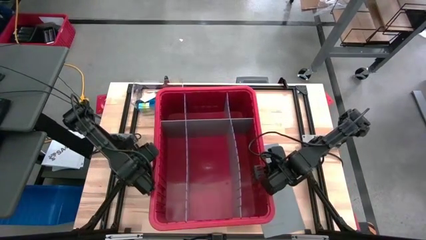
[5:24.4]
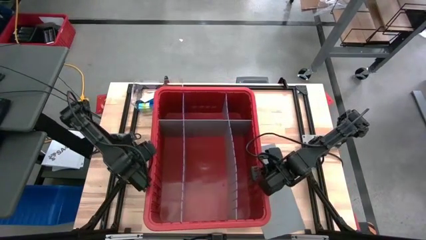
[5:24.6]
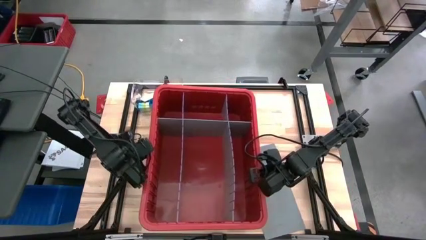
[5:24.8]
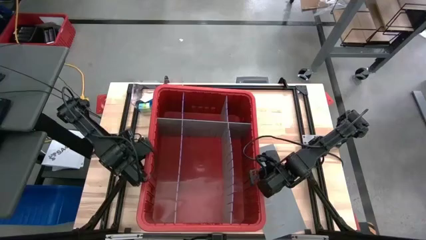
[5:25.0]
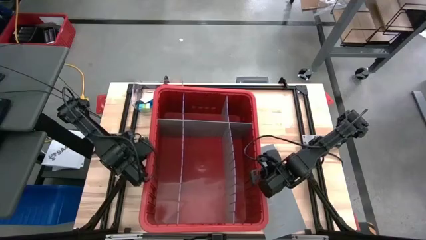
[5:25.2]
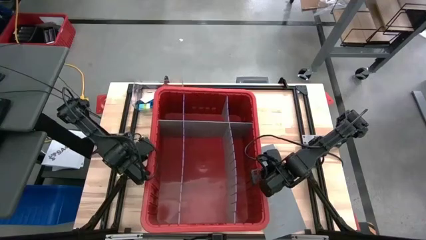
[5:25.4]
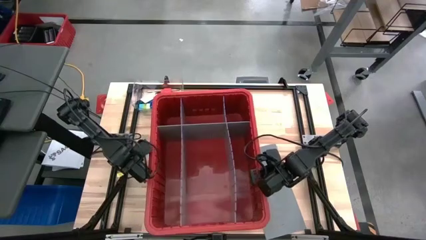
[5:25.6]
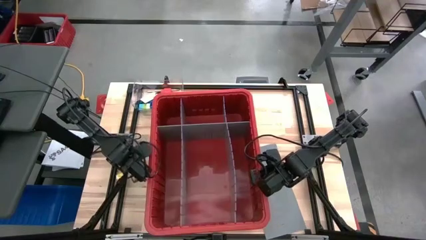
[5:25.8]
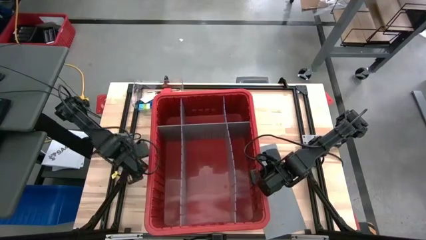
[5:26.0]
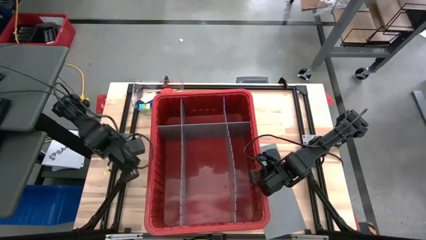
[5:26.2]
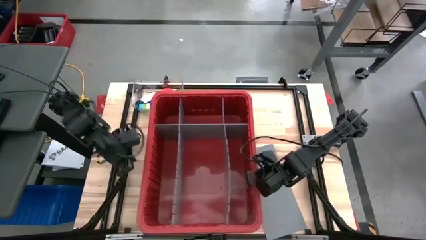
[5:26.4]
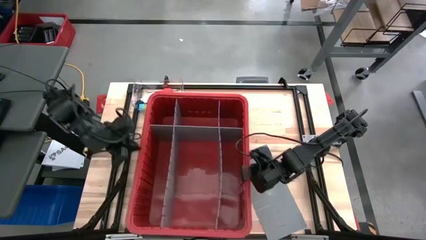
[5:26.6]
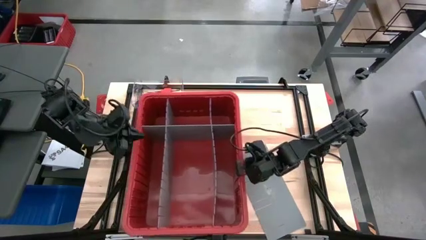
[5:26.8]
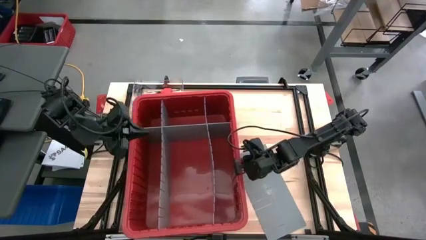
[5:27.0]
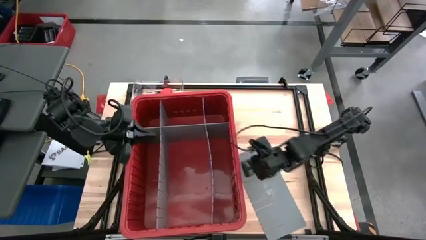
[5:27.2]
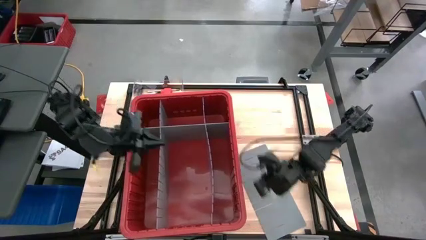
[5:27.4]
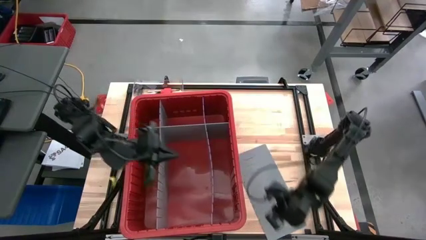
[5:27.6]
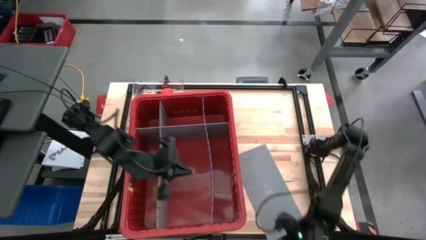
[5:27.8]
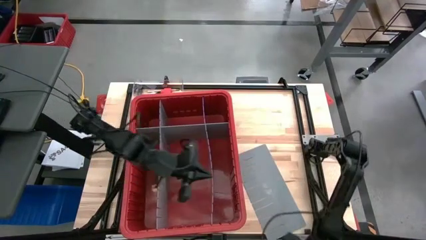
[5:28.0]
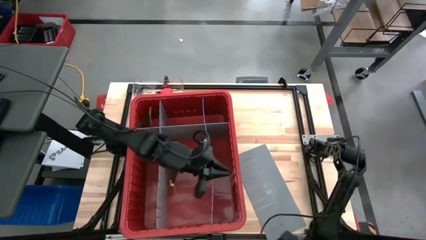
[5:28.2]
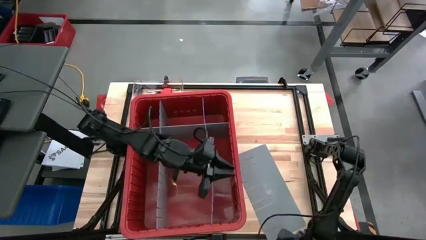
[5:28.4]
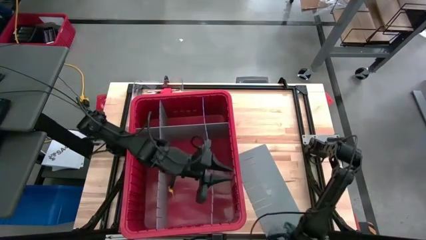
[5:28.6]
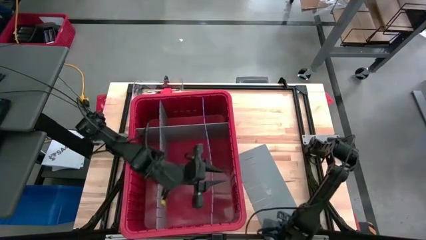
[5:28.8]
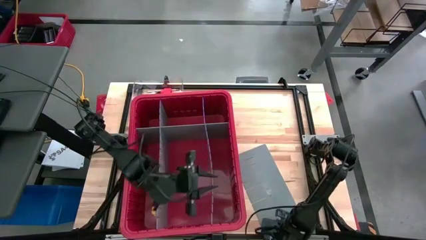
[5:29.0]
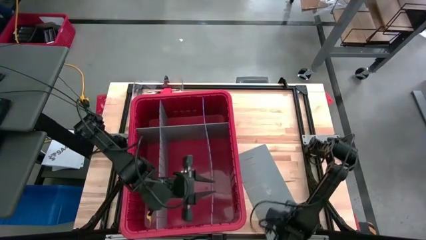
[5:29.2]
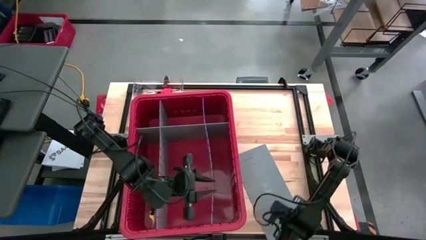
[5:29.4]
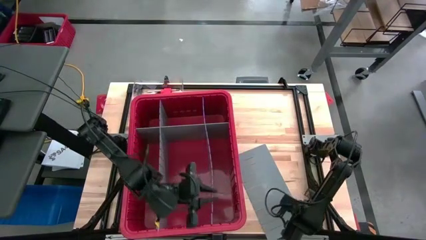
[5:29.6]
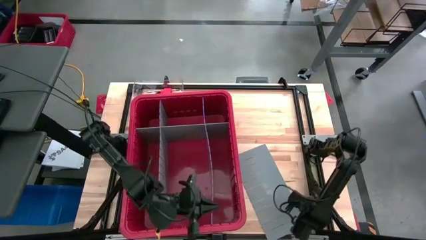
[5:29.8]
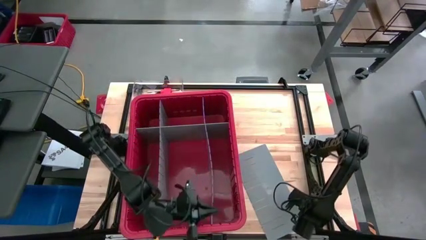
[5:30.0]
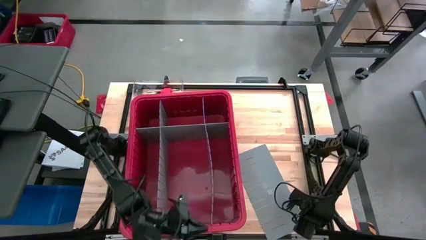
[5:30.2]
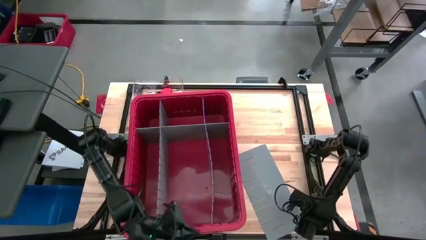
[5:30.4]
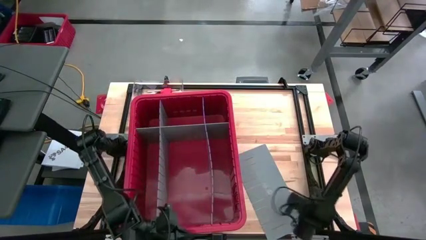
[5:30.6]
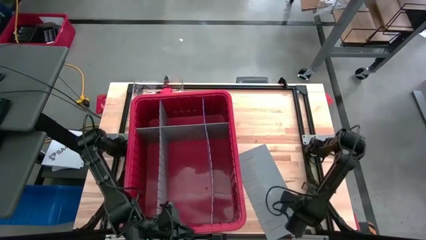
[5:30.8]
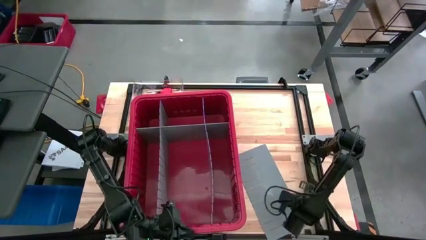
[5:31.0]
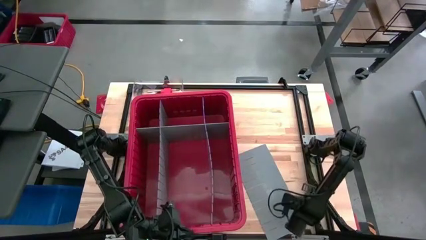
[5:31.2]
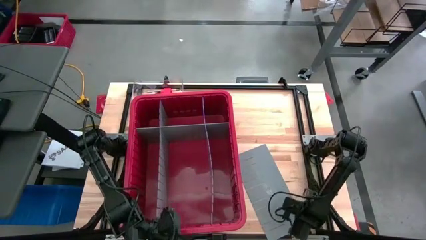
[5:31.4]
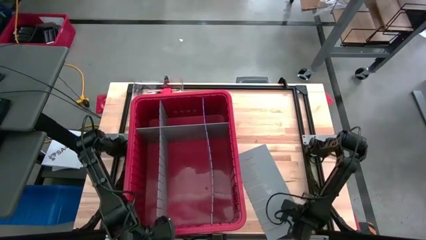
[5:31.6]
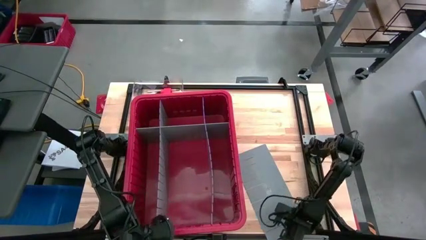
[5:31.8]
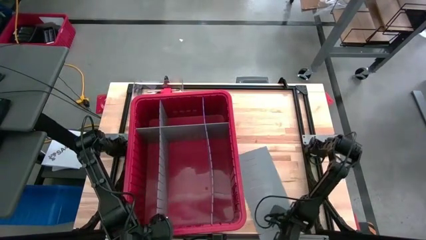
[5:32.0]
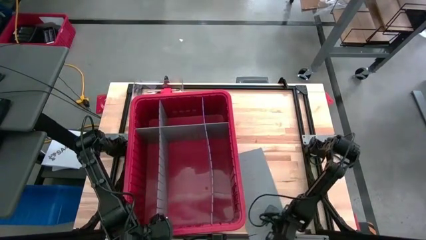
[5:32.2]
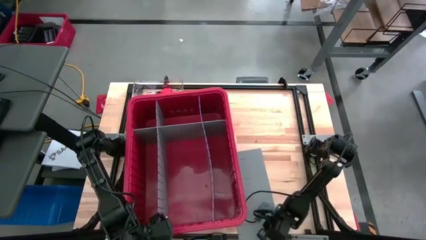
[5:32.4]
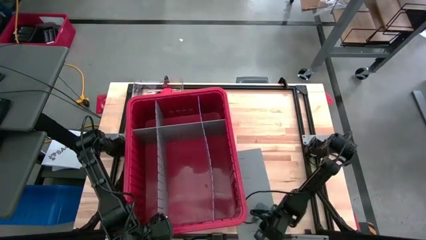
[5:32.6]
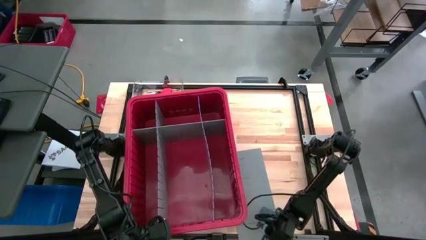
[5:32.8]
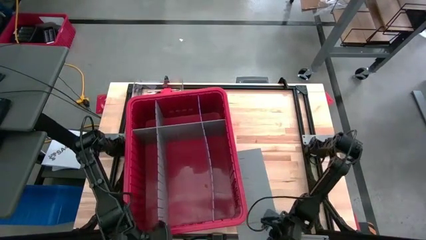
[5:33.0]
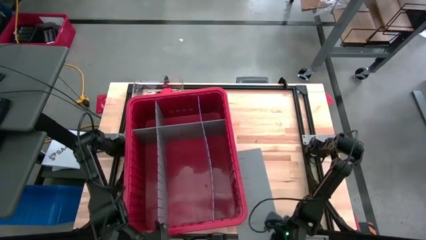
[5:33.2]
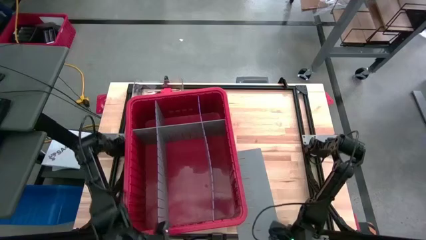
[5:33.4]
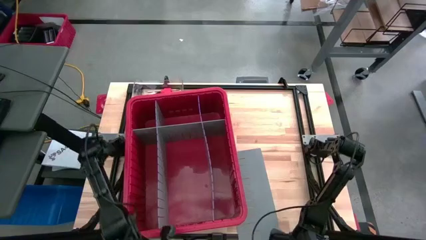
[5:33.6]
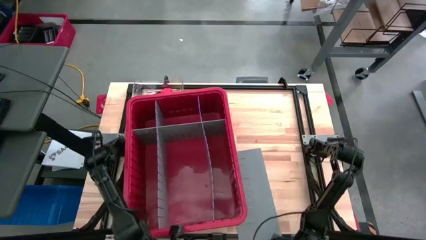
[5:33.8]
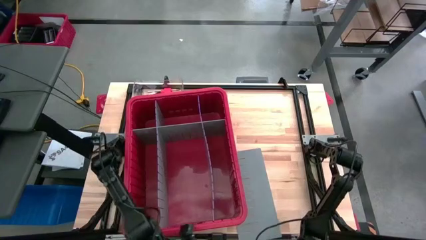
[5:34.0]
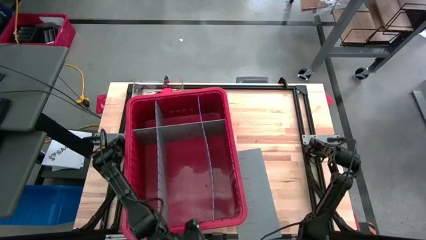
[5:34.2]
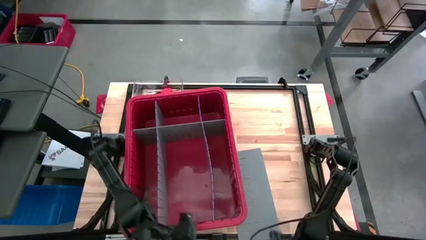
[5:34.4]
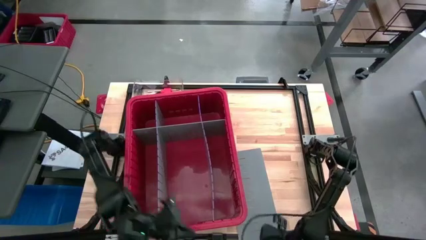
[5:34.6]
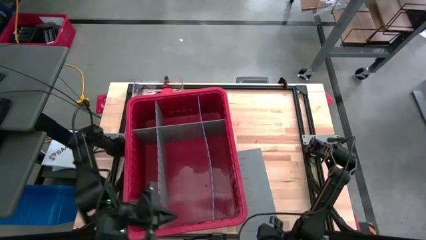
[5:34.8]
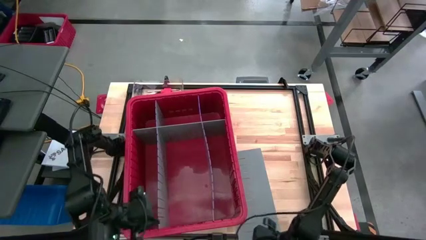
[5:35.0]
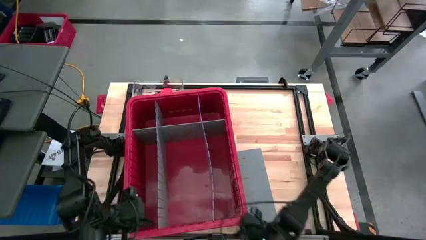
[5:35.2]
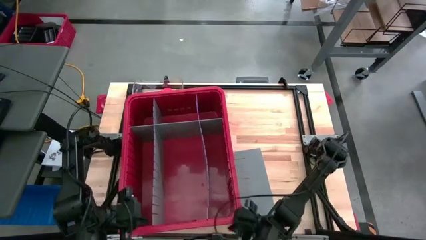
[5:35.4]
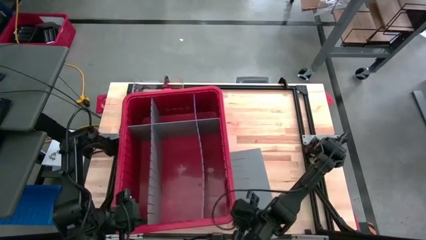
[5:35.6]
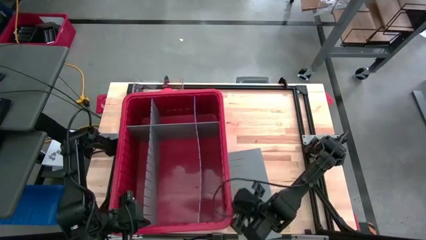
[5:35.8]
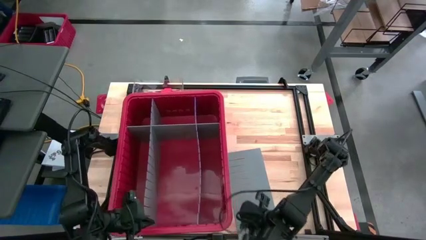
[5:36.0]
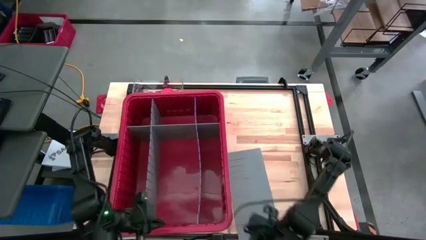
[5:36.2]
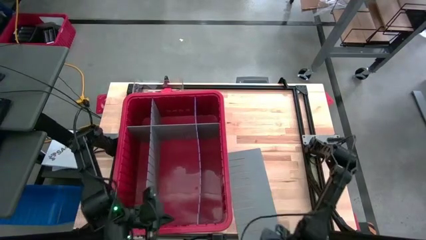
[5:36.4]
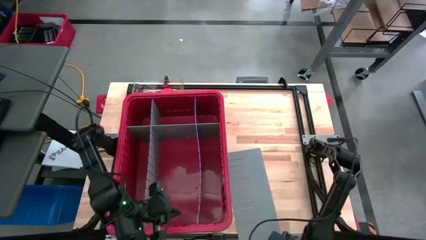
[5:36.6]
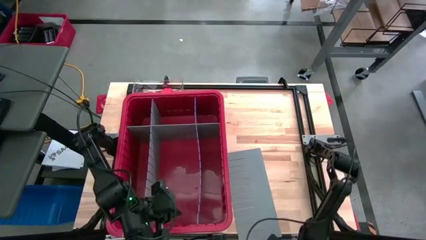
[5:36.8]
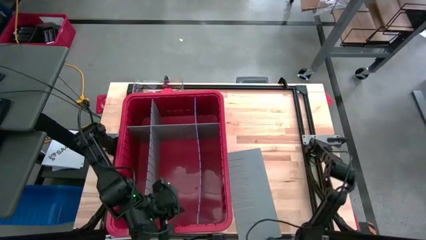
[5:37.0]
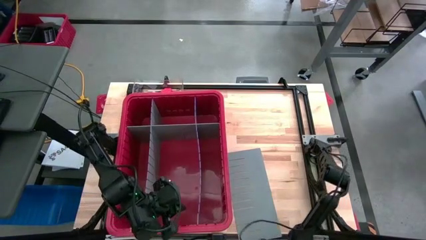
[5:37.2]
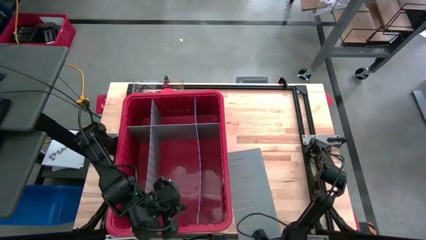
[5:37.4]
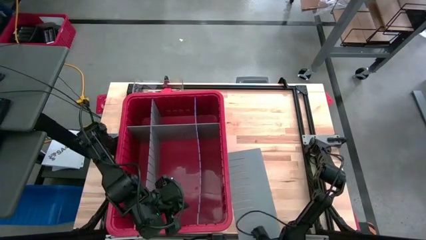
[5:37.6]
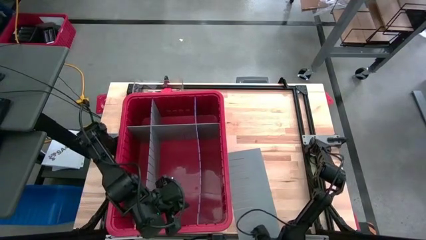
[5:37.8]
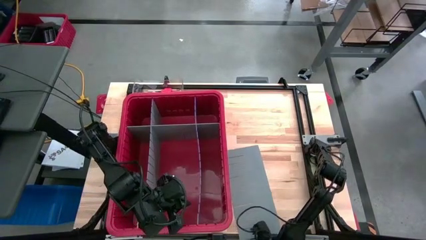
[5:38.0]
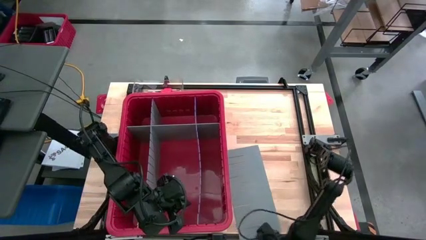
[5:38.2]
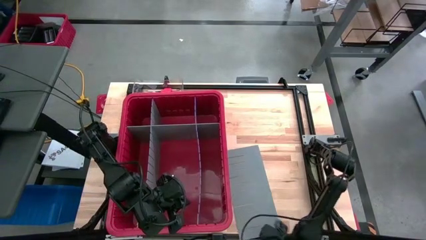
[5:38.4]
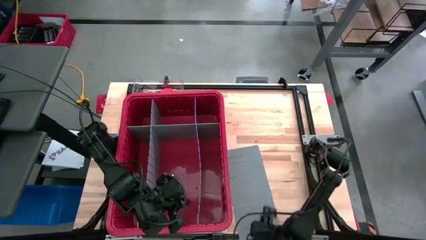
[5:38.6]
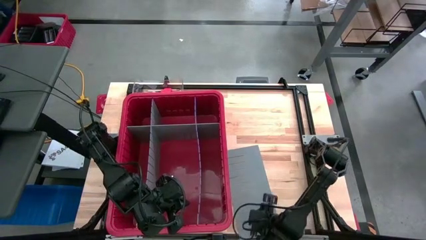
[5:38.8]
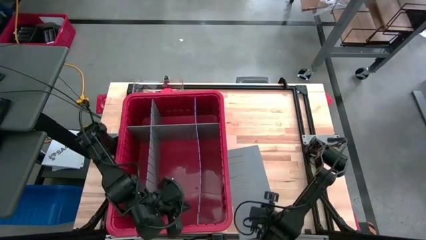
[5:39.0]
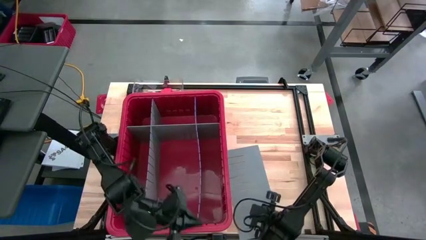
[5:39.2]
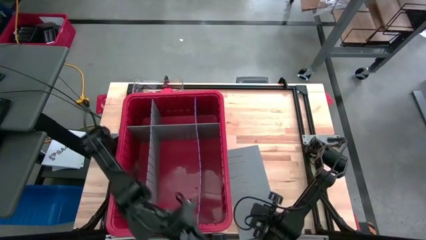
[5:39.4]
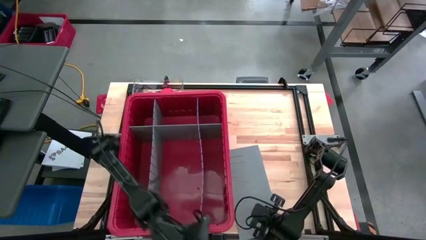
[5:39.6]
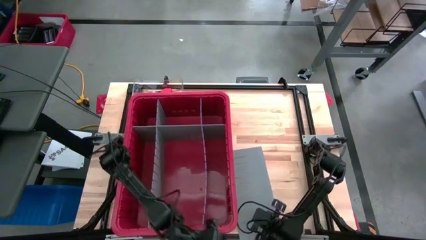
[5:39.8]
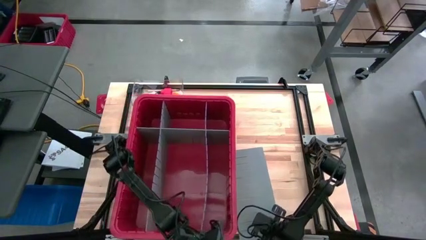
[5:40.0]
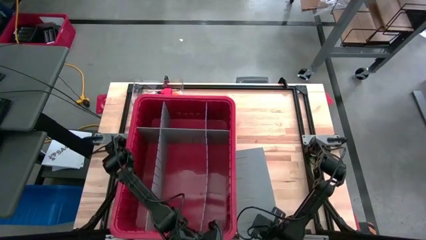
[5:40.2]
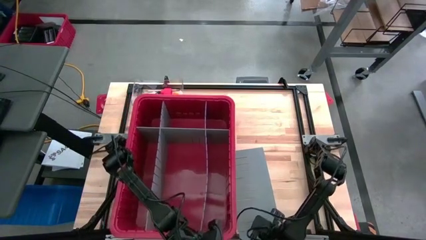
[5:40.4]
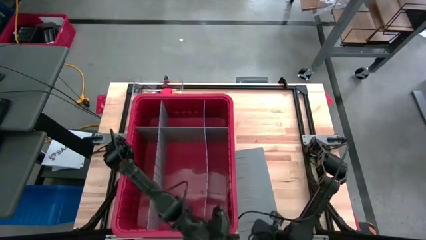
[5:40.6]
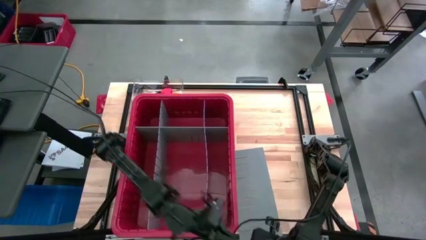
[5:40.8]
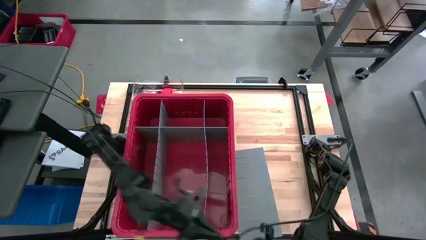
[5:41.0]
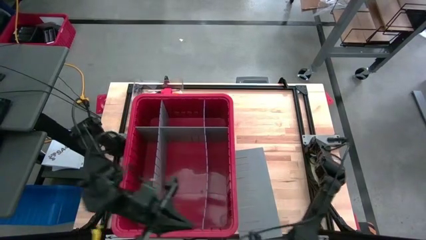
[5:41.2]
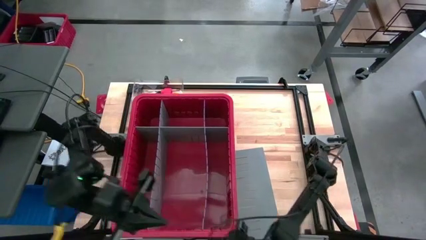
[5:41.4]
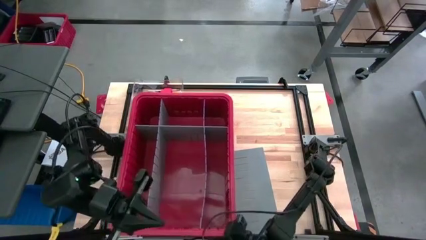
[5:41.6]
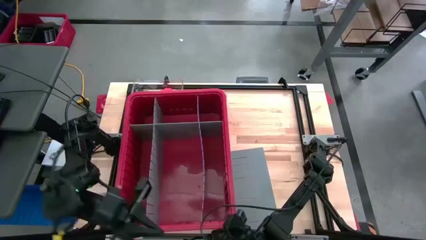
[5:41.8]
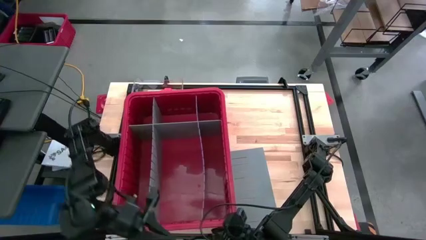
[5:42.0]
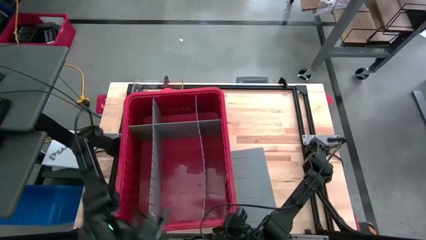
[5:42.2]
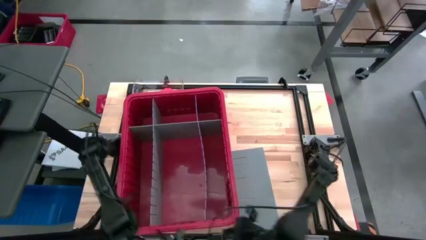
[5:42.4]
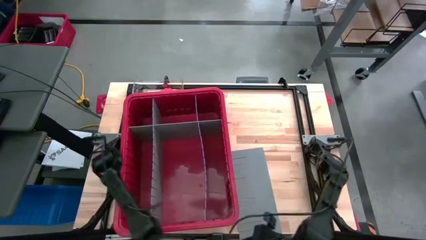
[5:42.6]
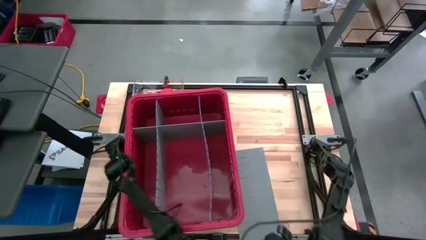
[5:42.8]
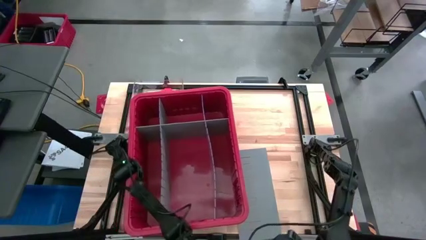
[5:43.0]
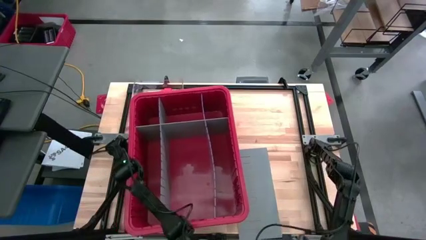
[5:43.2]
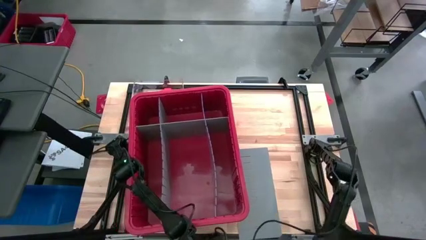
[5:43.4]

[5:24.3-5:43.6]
Task: Sort blocks
Assemble the bin divider into the red bin
